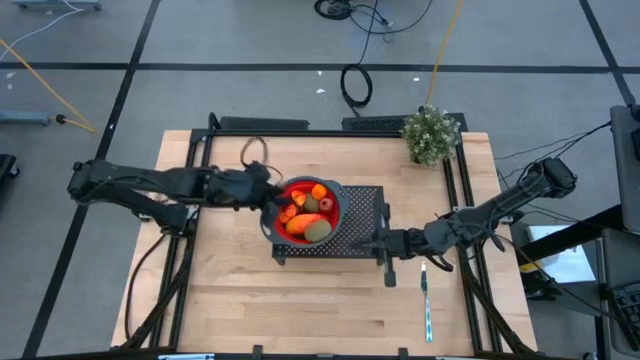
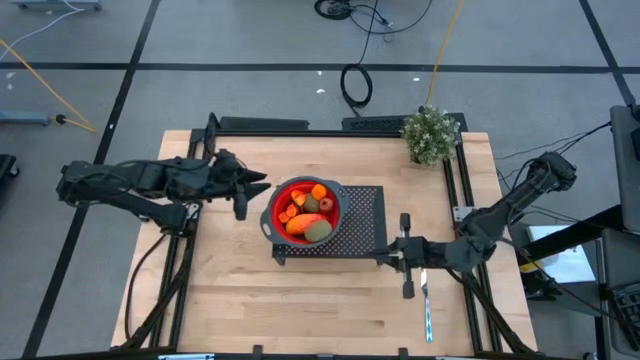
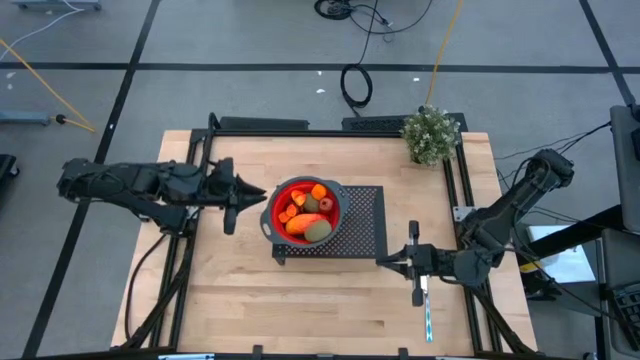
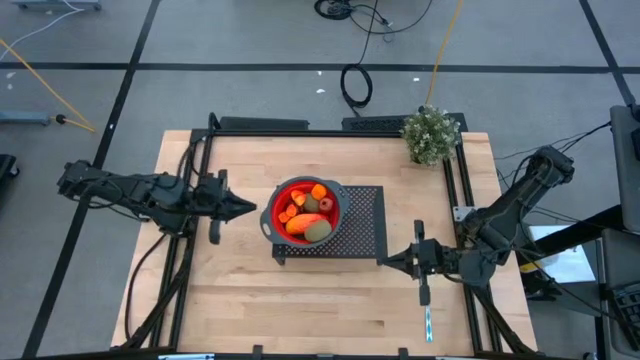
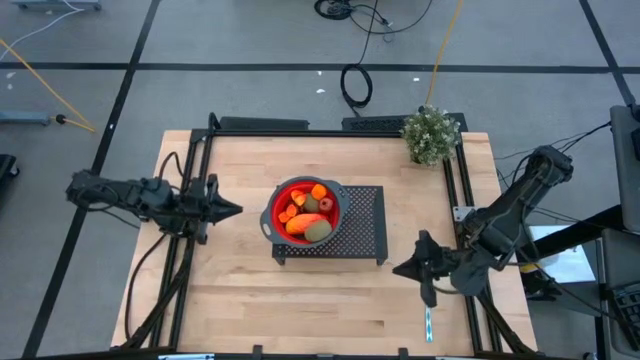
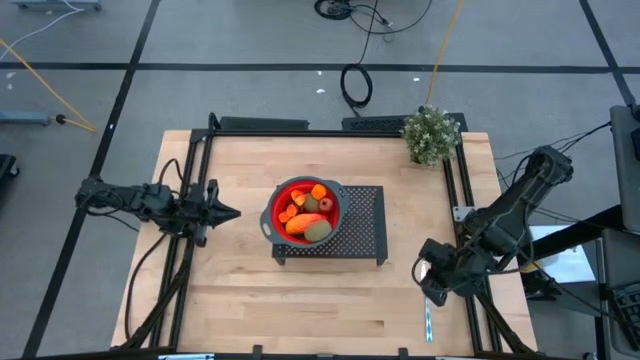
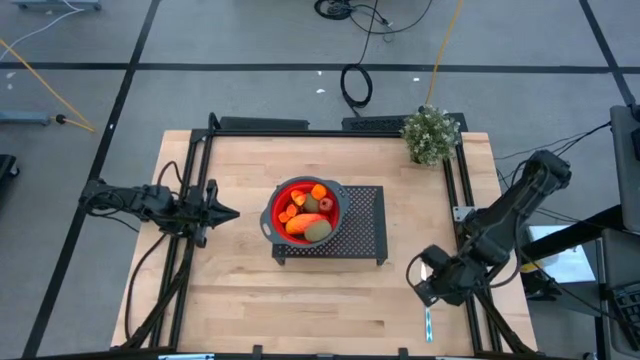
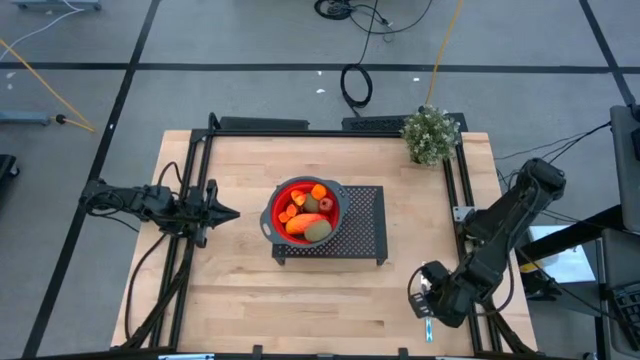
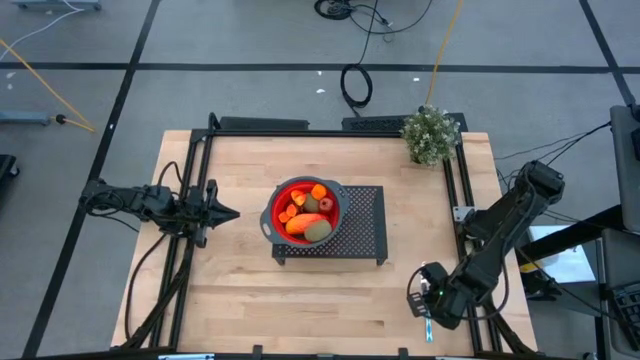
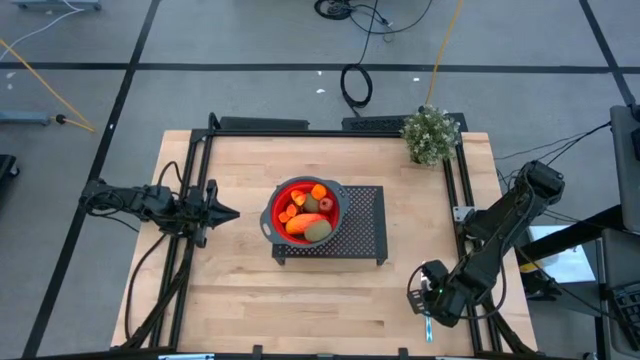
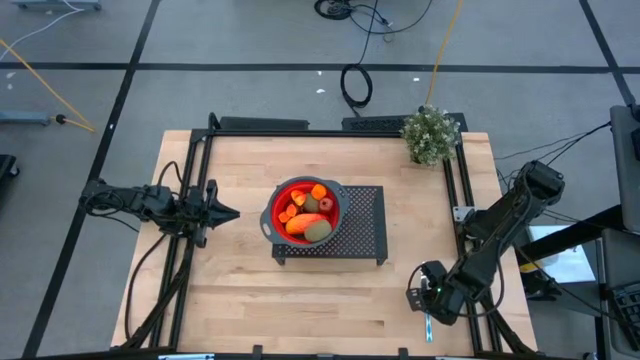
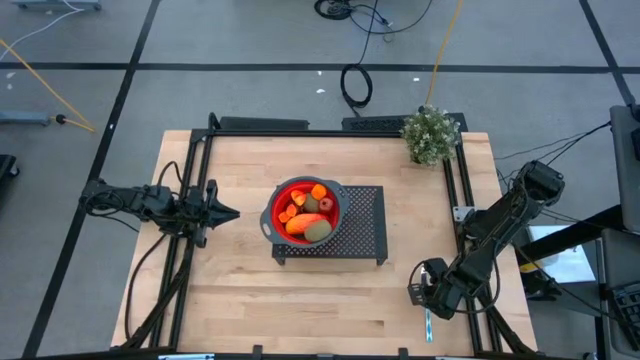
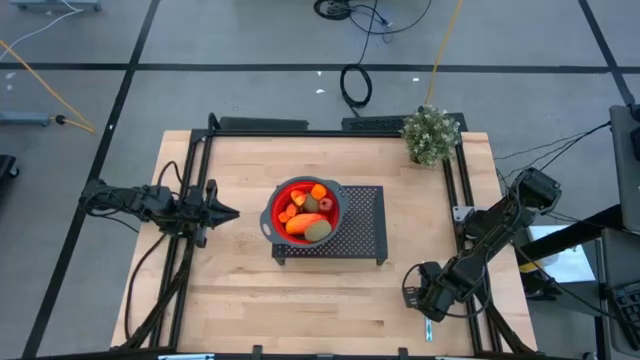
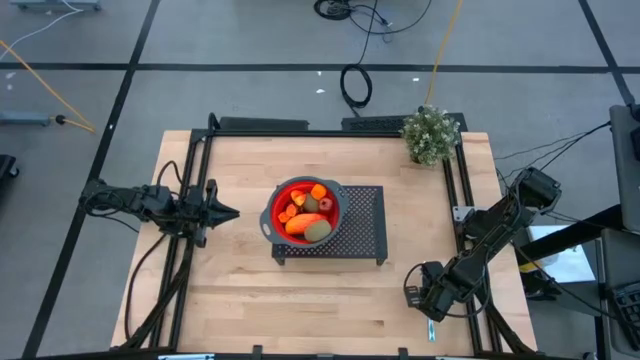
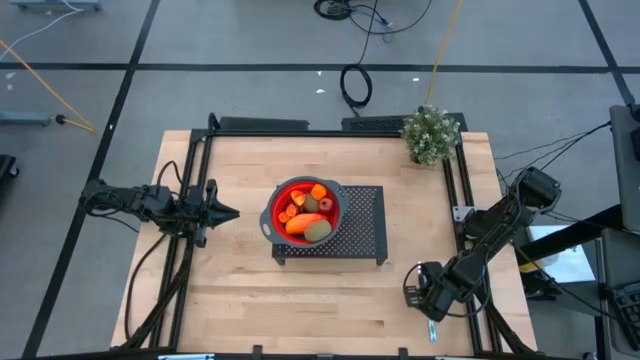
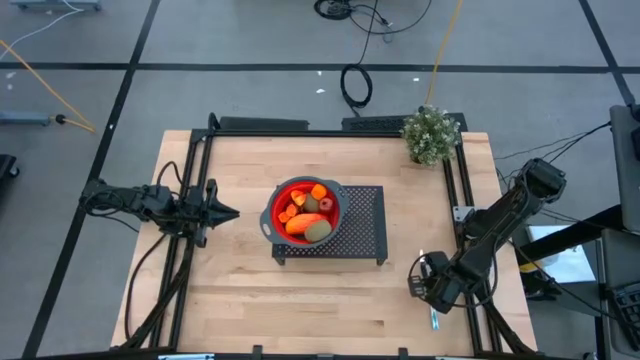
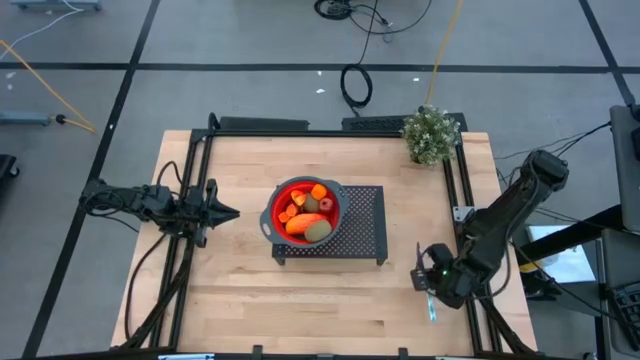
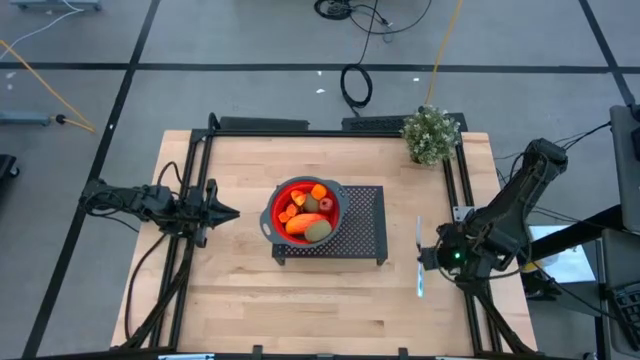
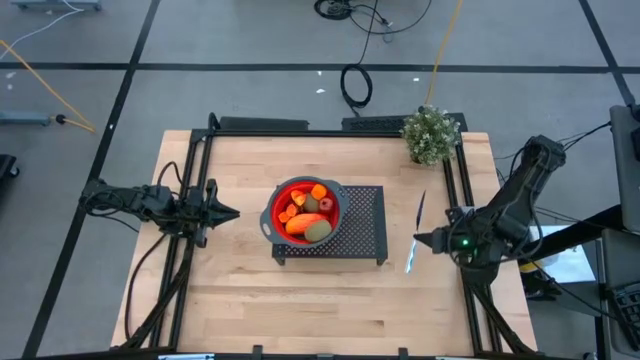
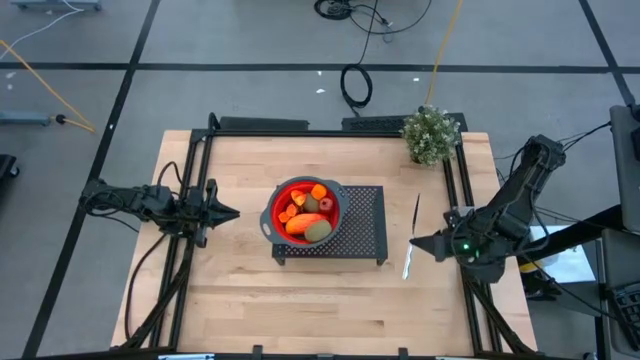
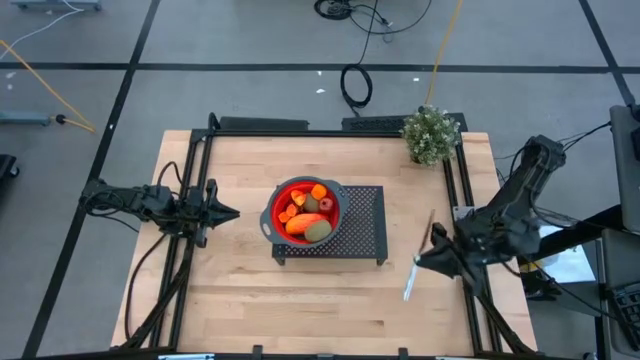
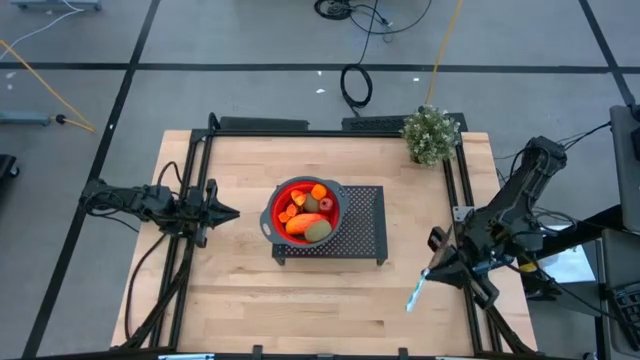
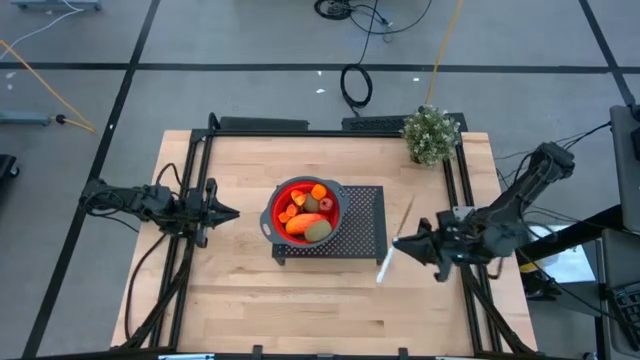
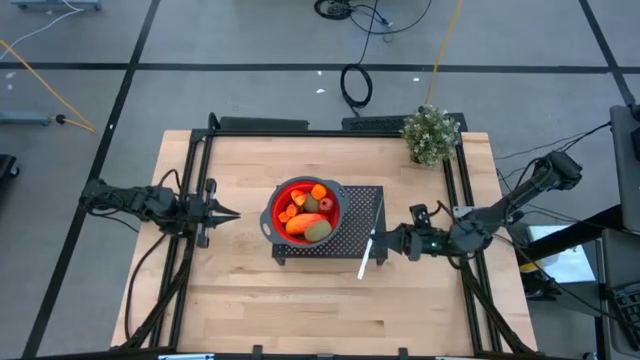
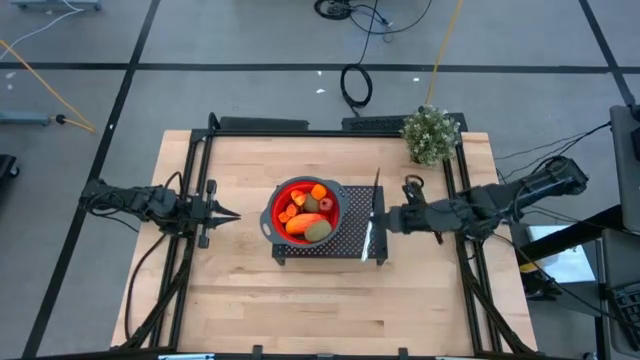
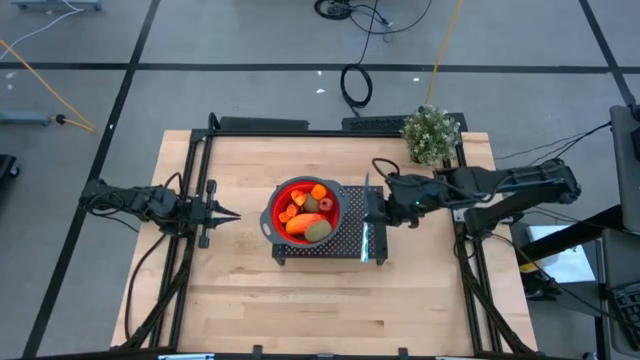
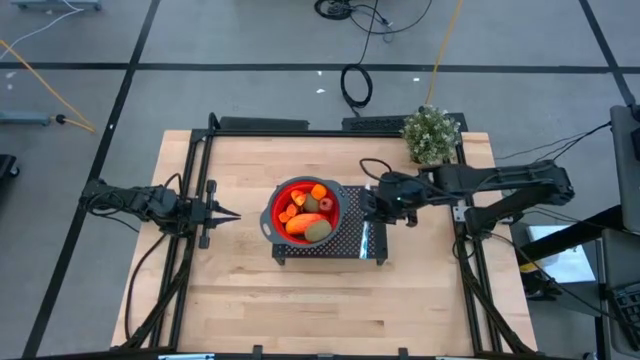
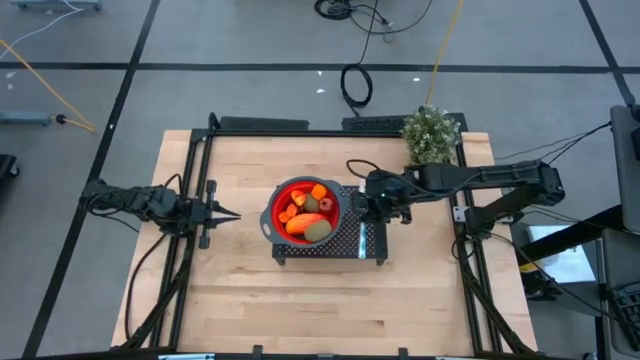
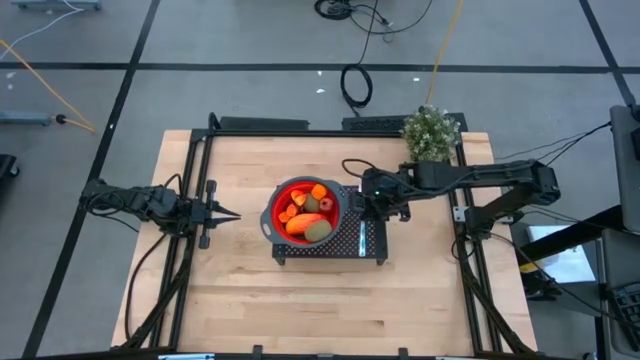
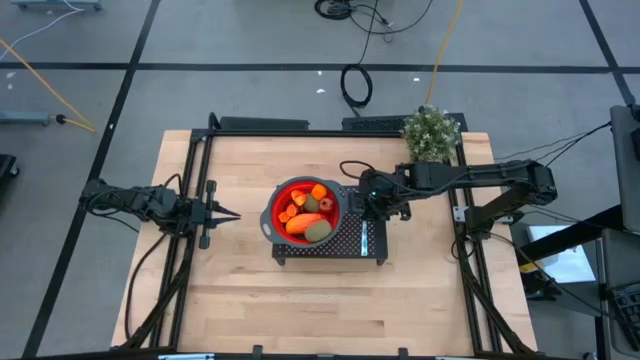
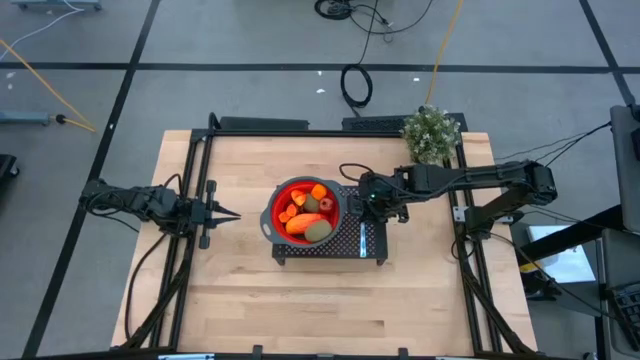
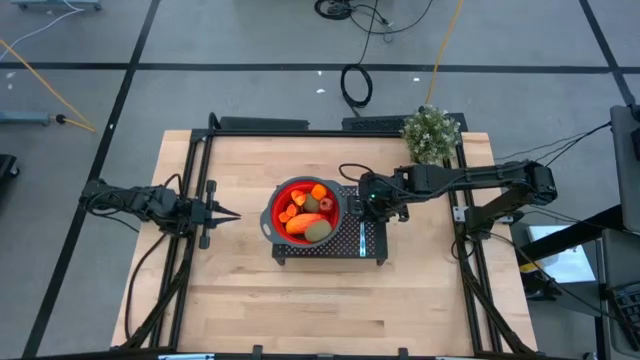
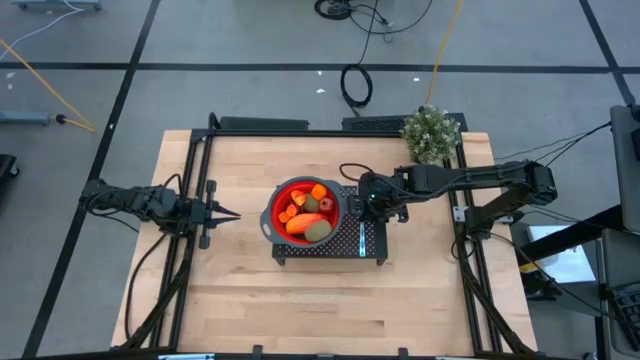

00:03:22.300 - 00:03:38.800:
Task: Pick & Place Fruit
Put the blue and white patterned knife on the shelf

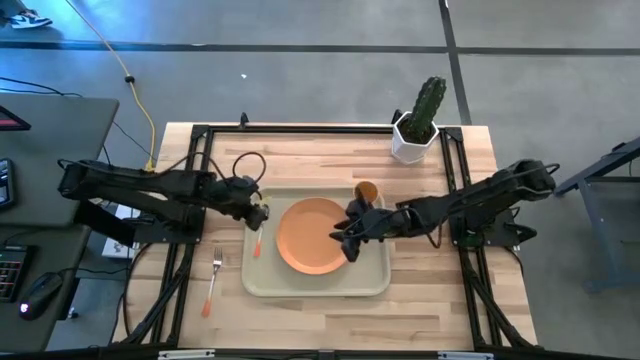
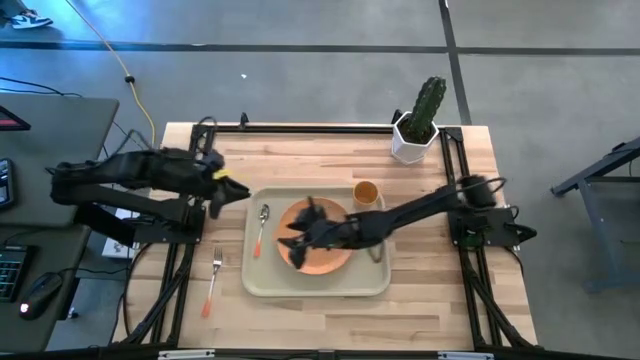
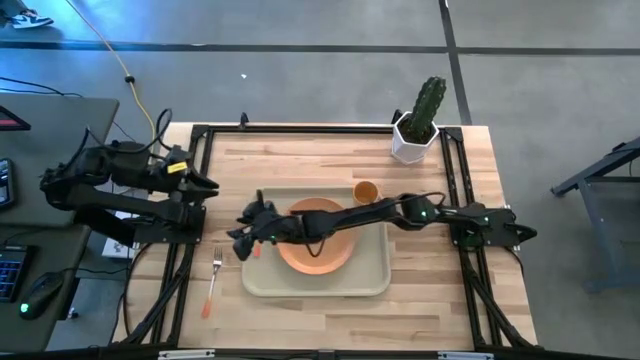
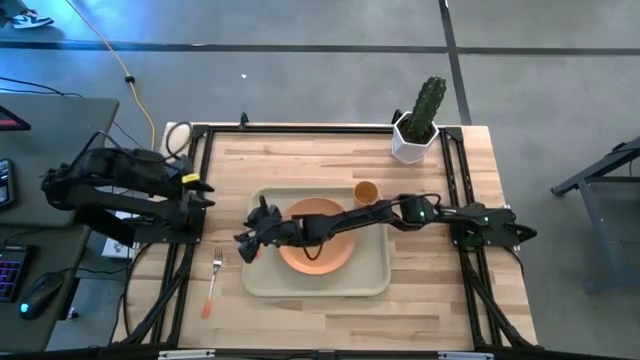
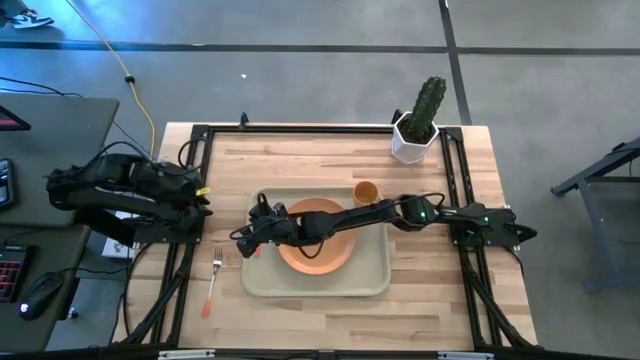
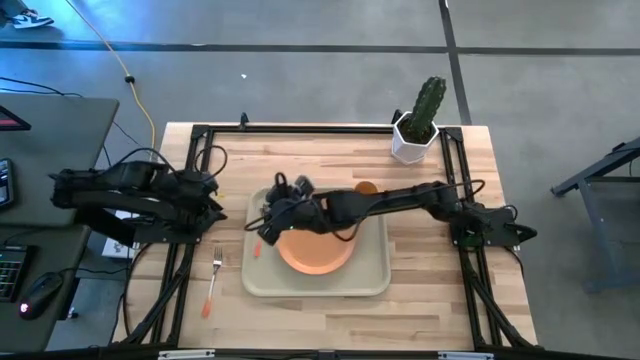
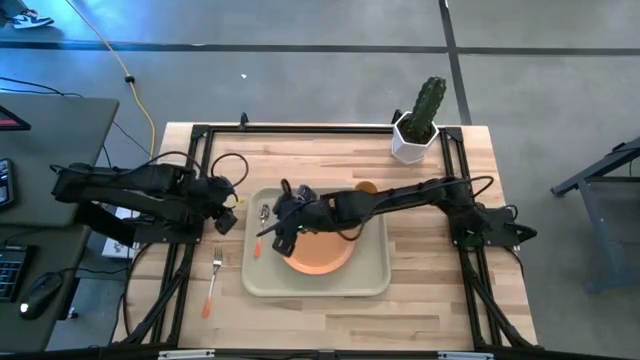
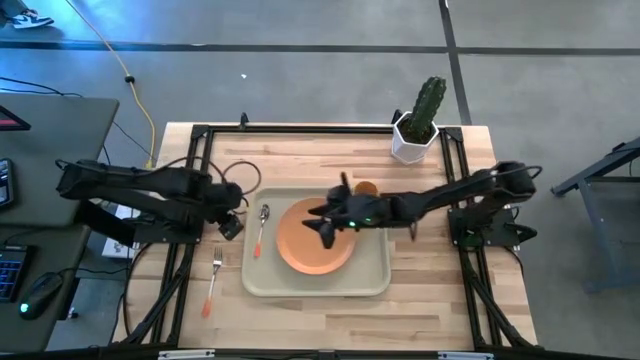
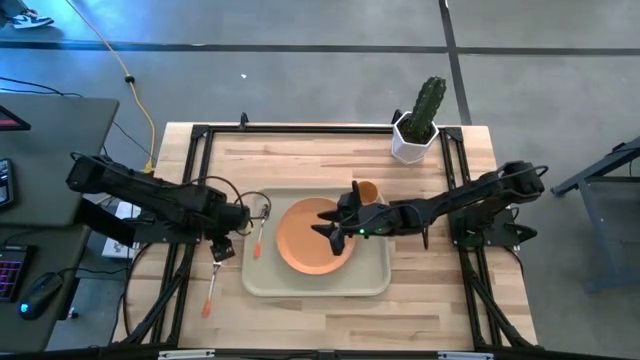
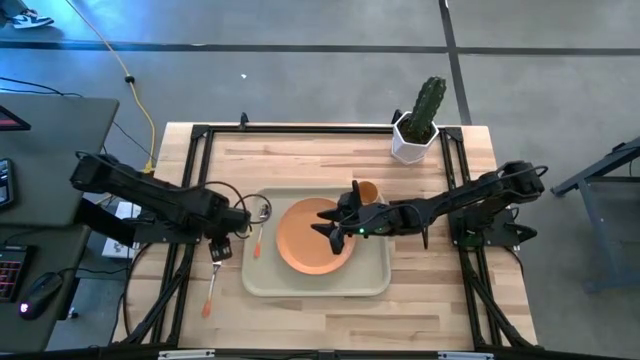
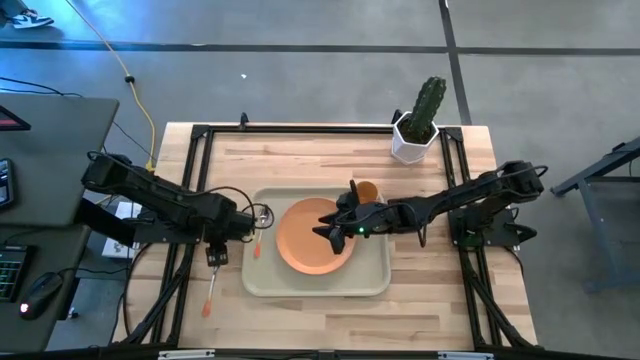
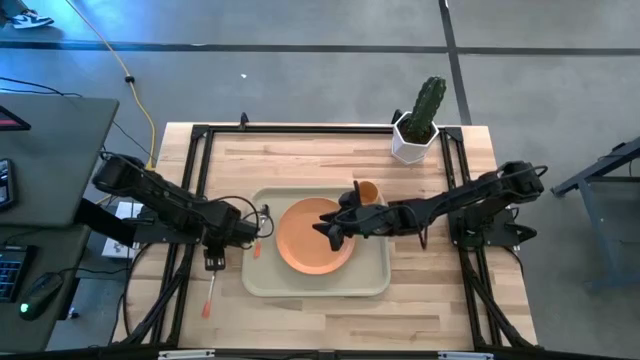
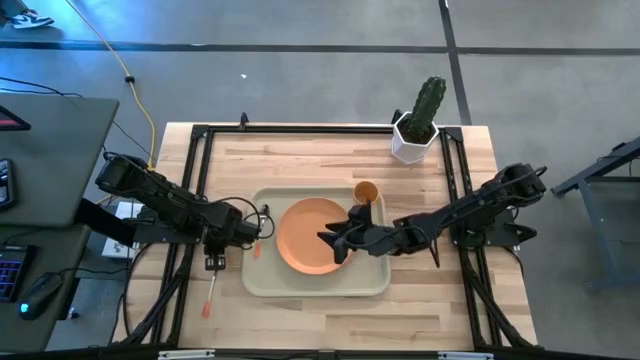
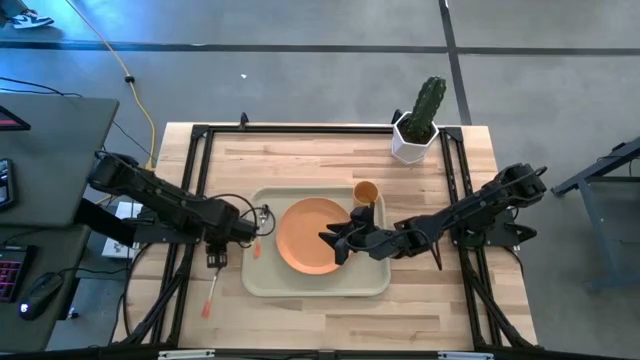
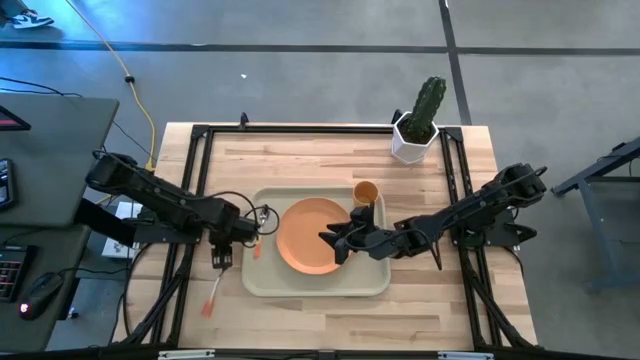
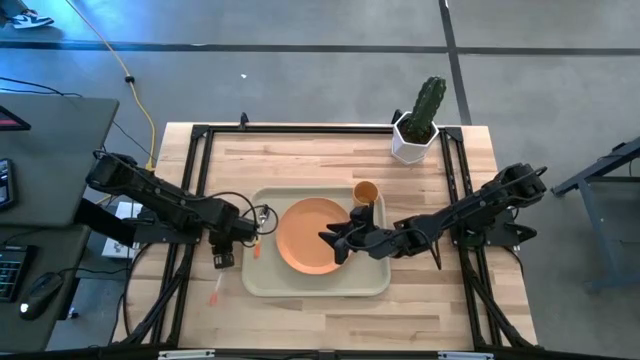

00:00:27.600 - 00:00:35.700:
Task: Pick and place plate/cup/fork/spoon on tray
Put the orange fork between the orange spoon and the orange plate on the gray tray
